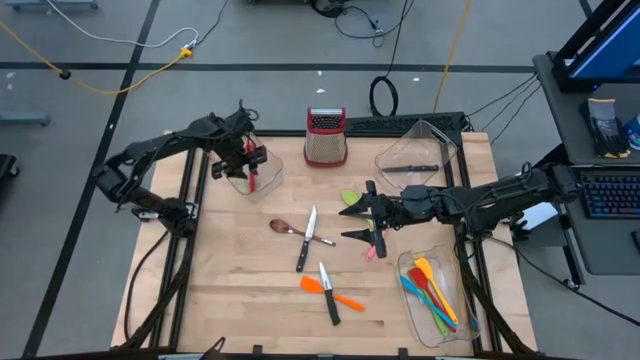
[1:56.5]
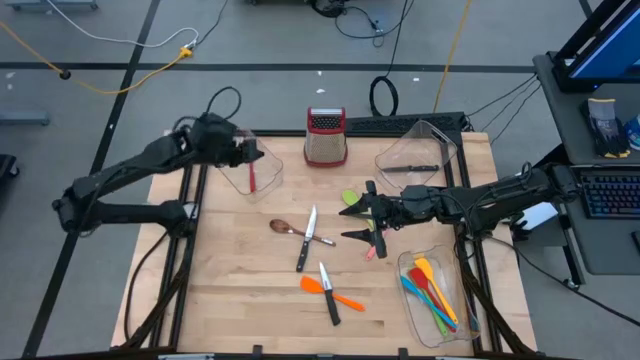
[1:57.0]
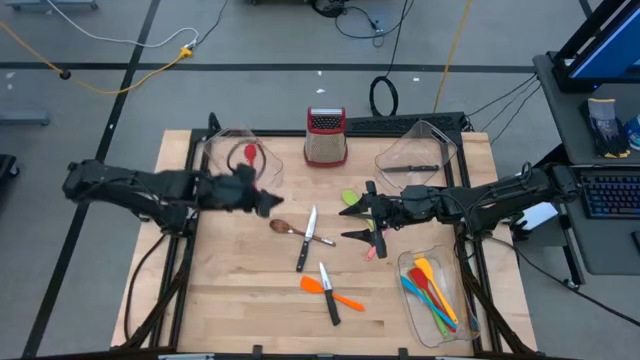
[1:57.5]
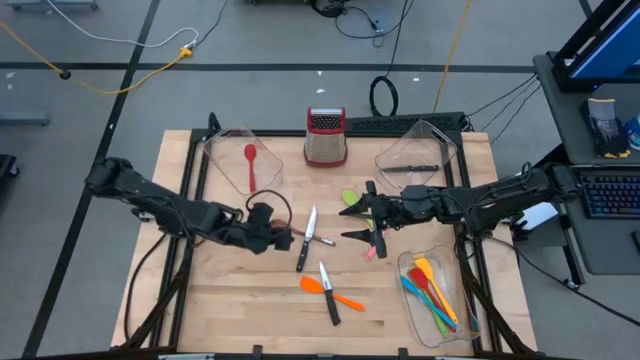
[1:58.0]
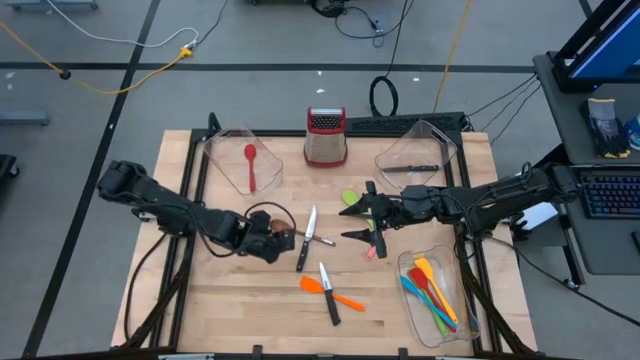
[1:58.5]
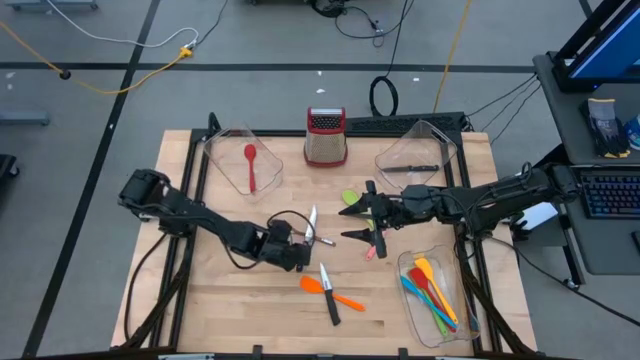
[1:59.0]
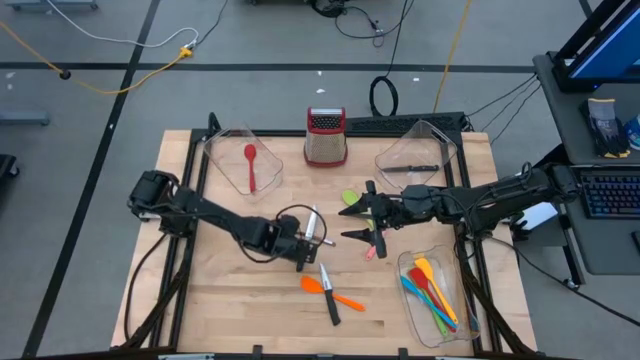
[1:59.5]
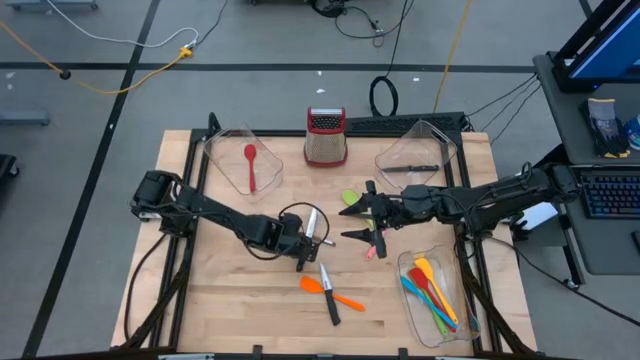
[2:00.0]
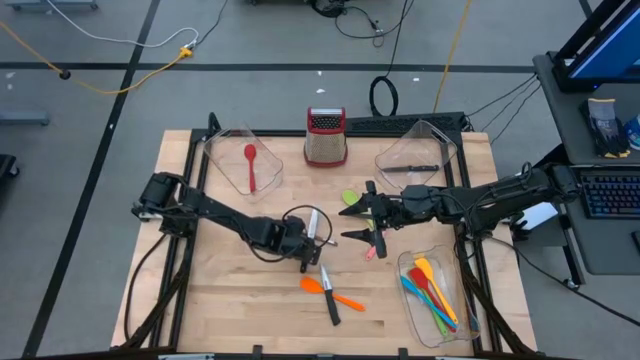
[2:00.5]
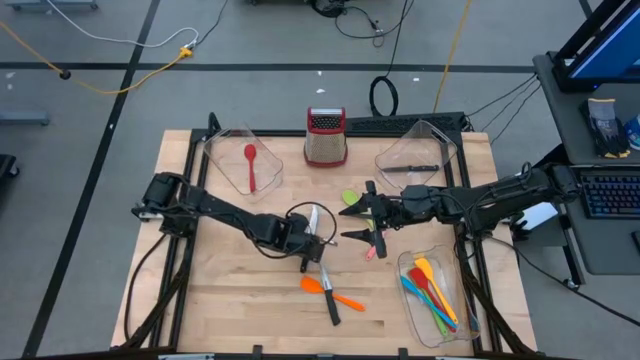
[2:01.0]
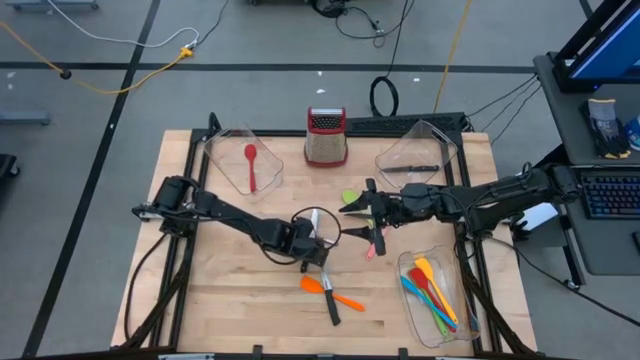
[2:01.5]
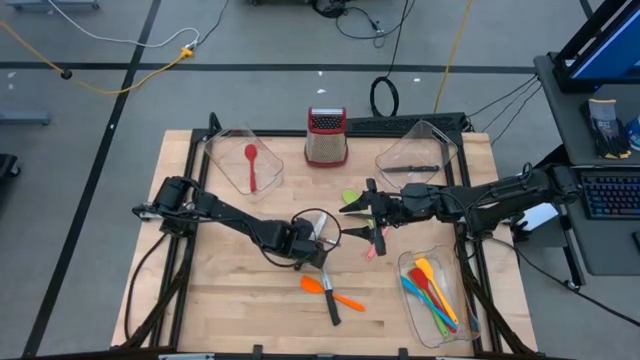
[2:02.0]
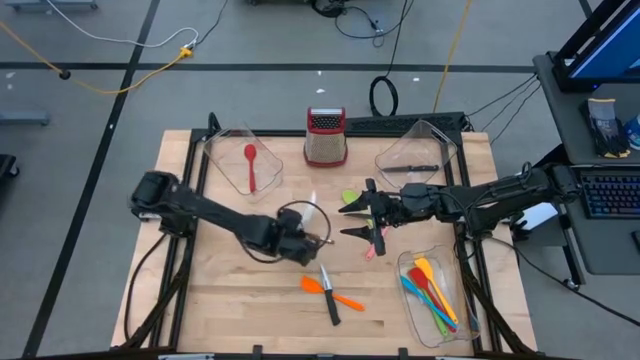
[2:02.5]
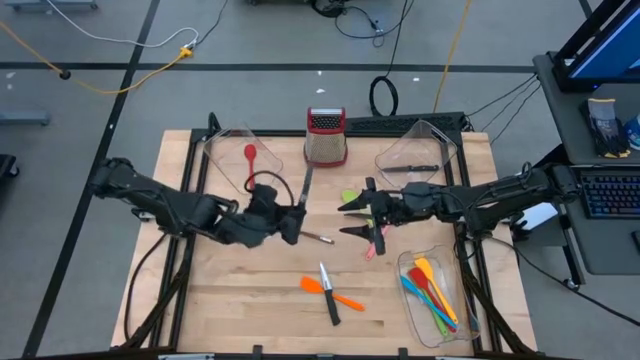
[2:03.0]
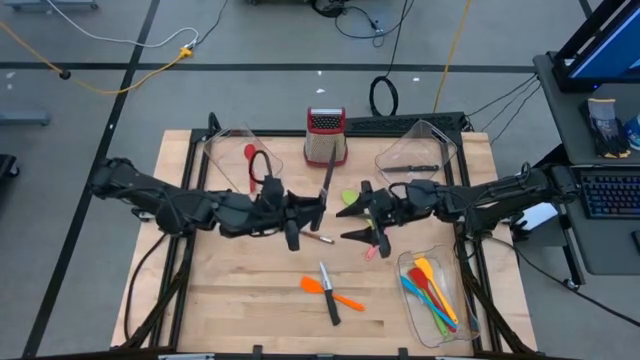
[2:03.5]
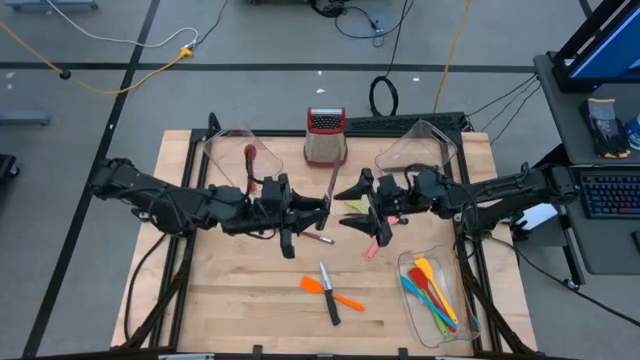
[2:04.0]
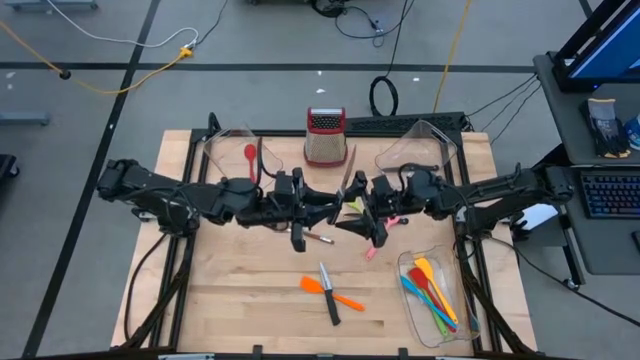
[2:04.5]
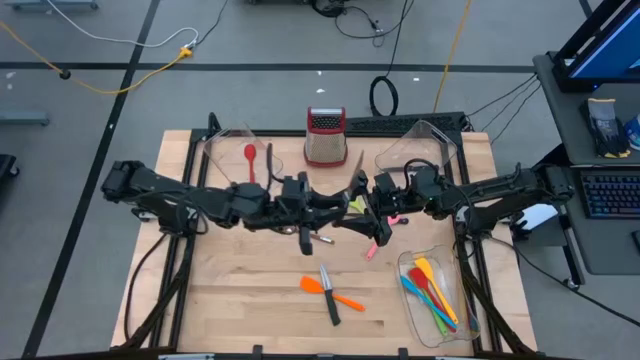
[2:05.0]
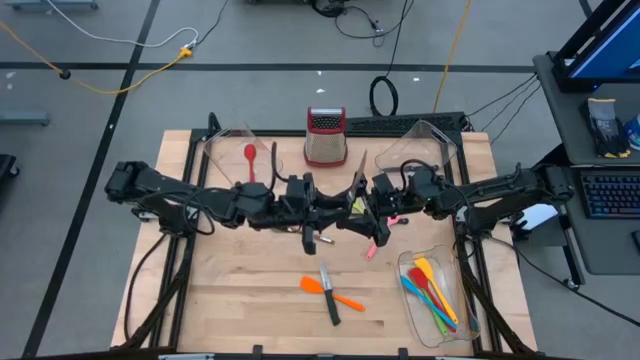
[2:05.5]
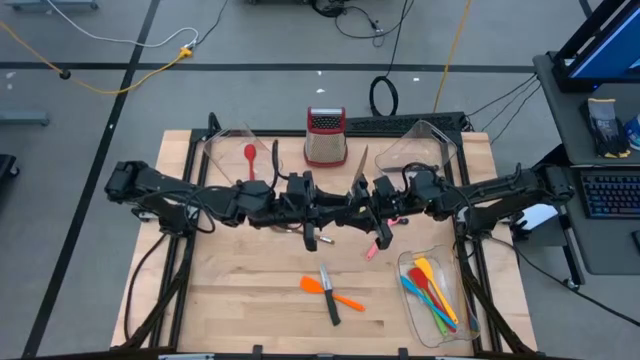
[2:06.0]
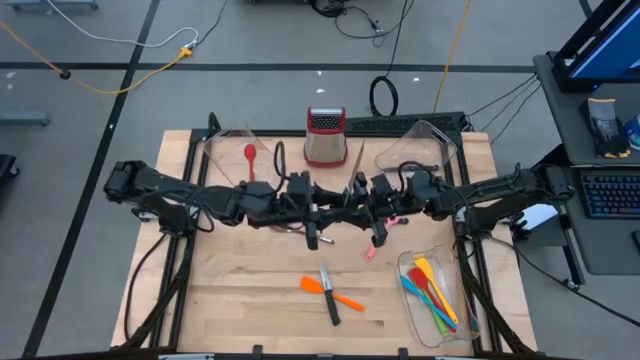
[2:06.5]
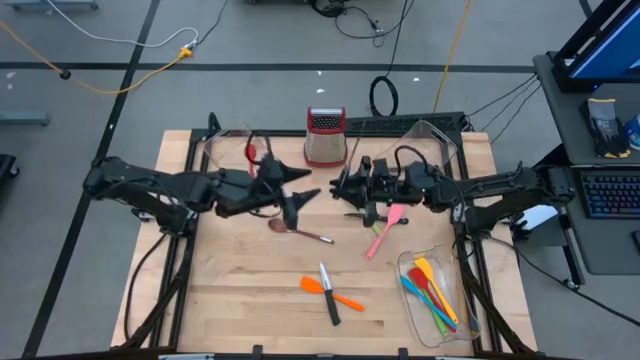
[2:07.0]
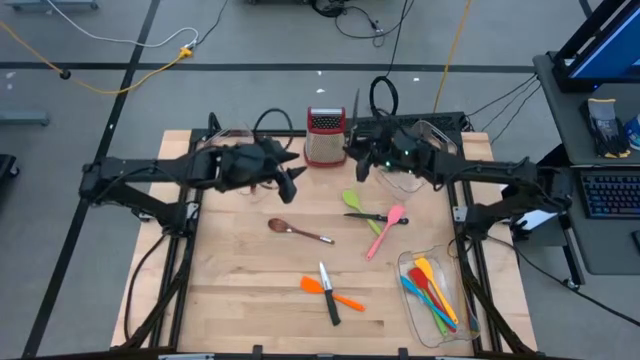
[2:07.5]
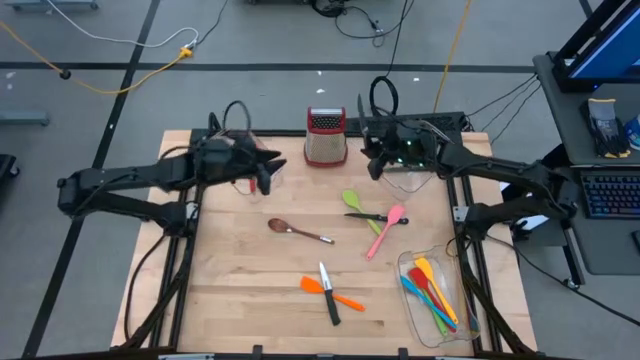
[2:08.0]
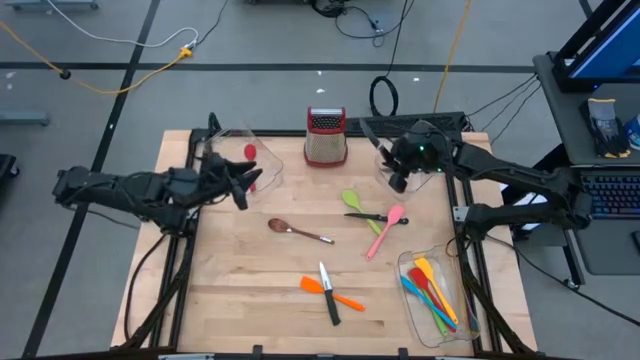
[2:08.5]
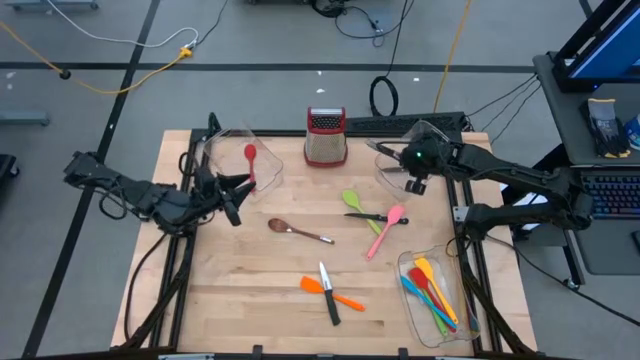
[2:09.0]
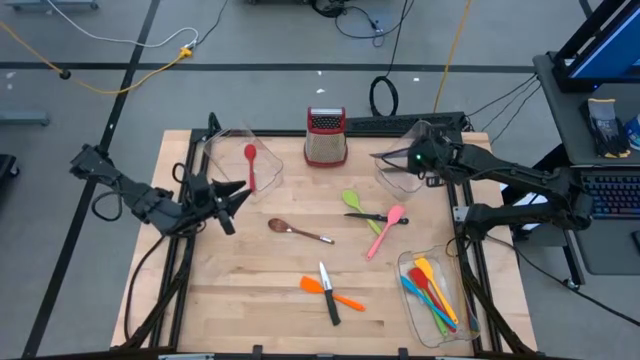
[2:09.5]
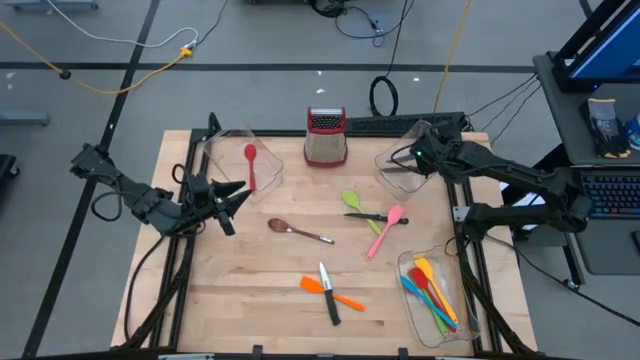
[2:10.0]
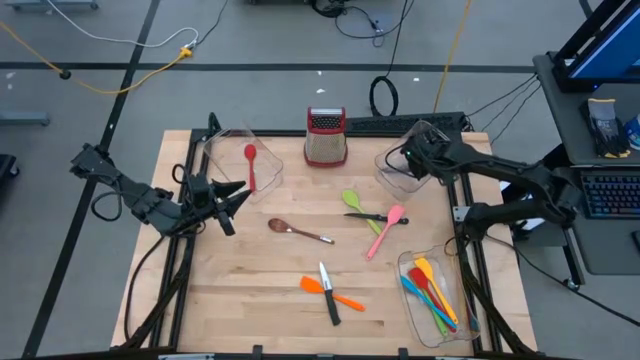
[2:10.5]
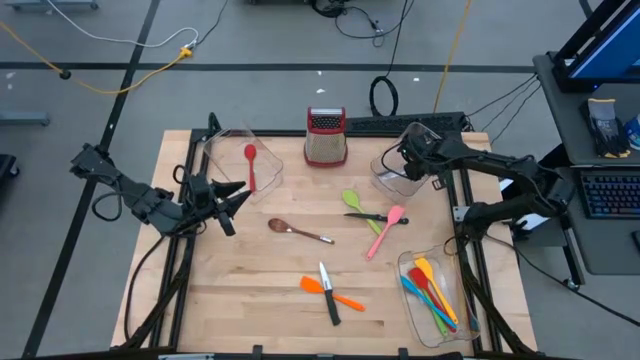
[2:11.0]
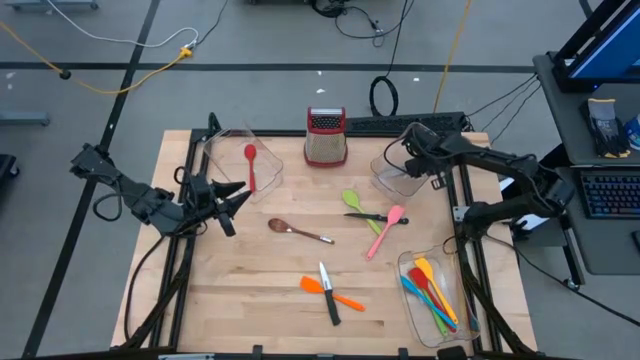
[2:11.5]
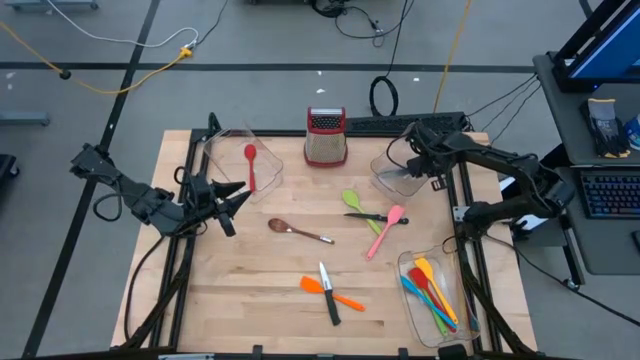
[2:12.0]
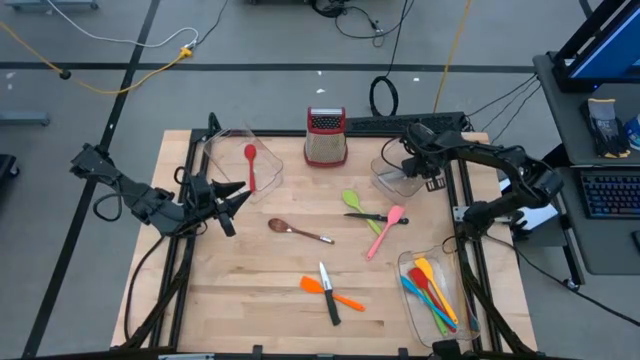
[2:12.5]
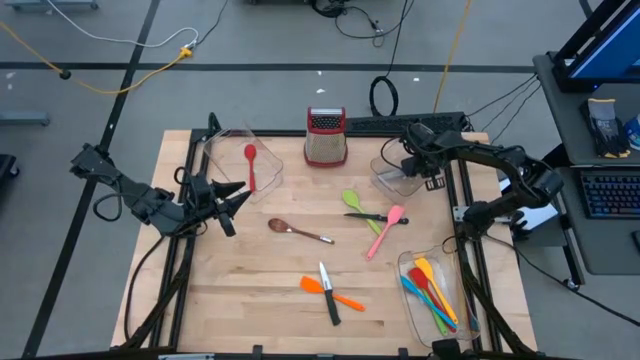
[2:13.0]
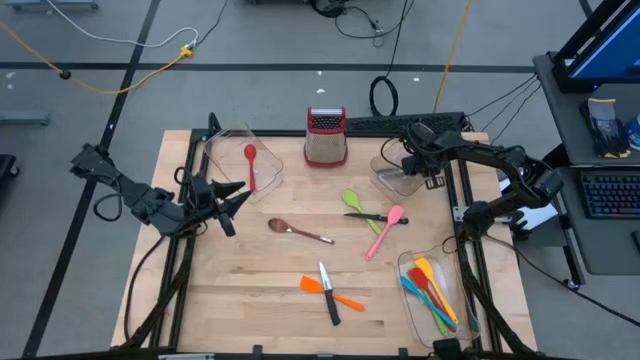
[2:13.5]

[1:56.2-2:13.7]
Task: Pick & Place Kitchen Items
Put the top silver kitchen knife into the top right transparent bin

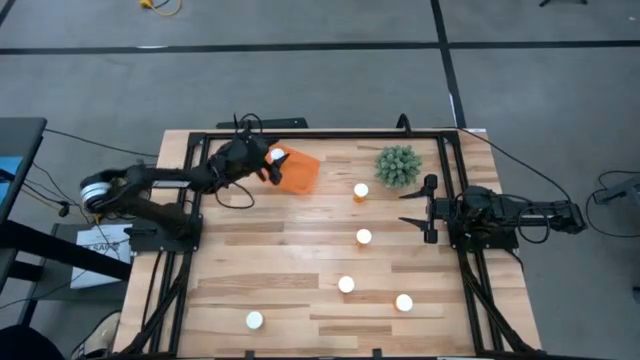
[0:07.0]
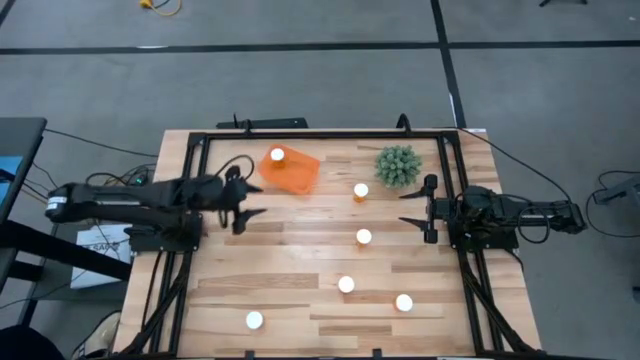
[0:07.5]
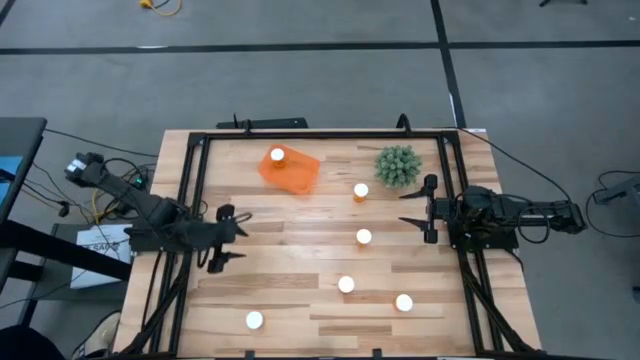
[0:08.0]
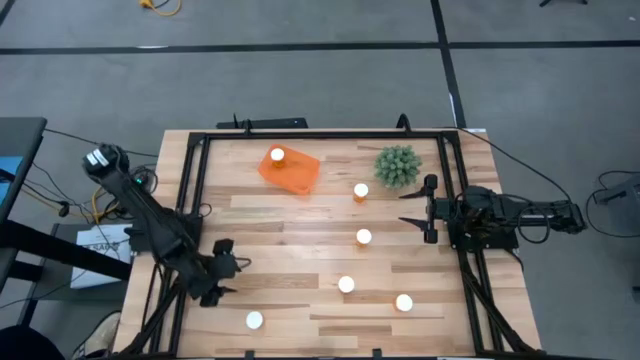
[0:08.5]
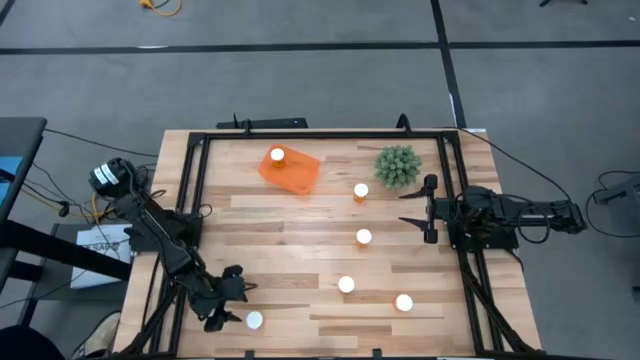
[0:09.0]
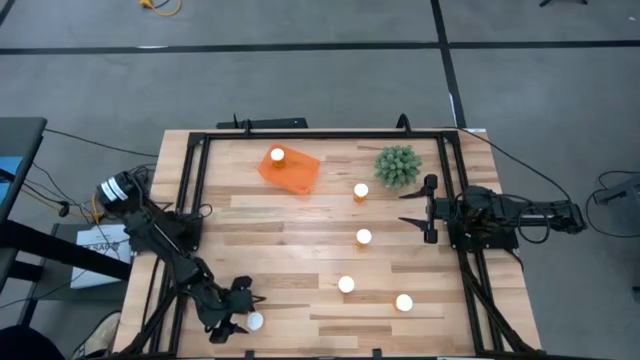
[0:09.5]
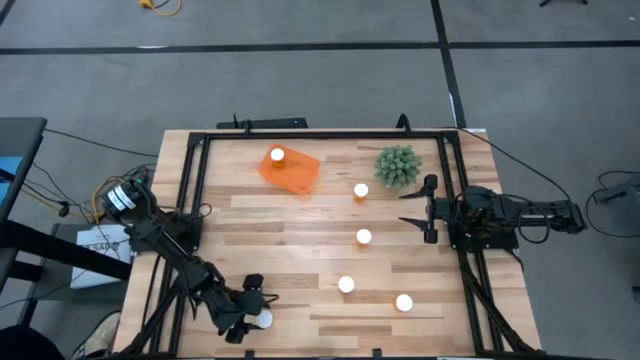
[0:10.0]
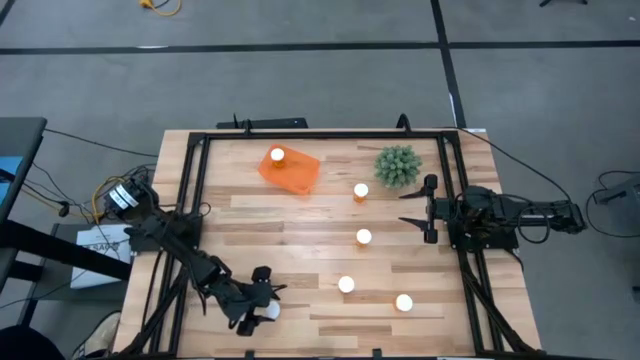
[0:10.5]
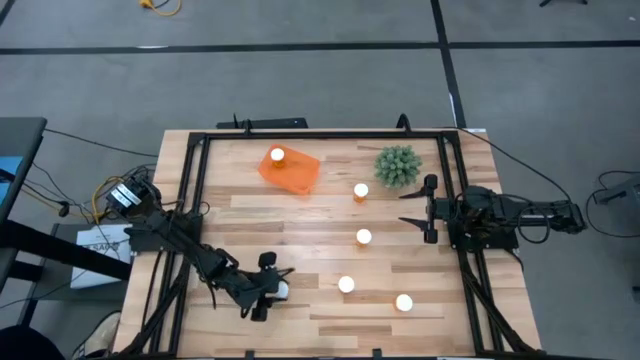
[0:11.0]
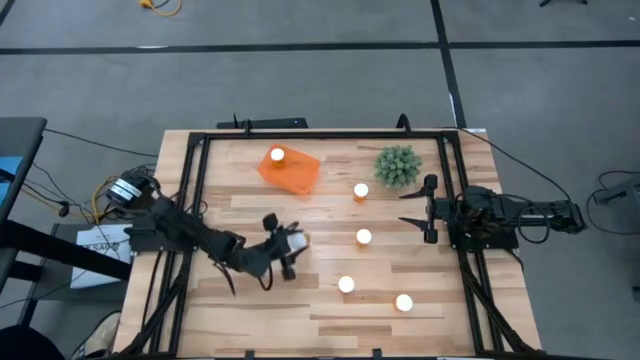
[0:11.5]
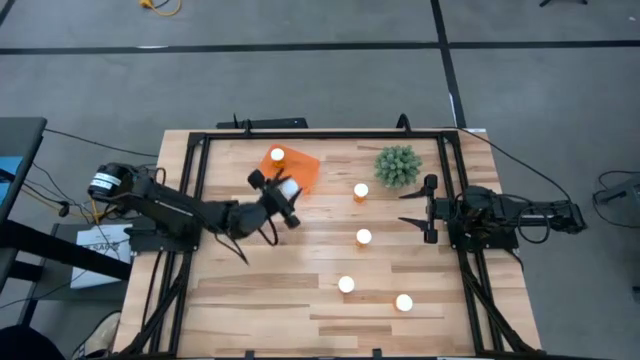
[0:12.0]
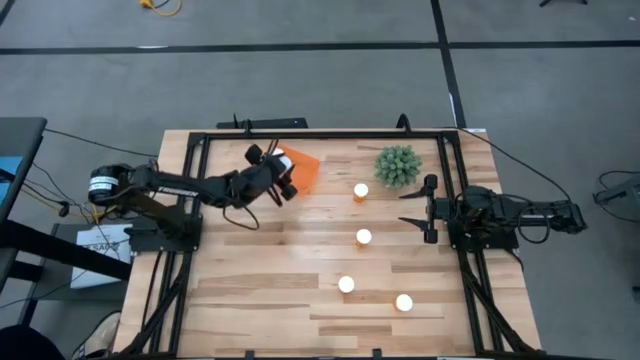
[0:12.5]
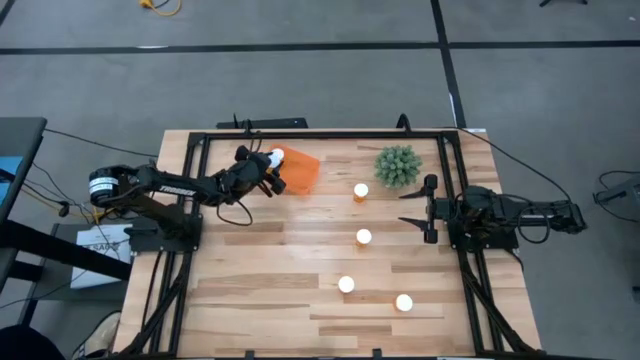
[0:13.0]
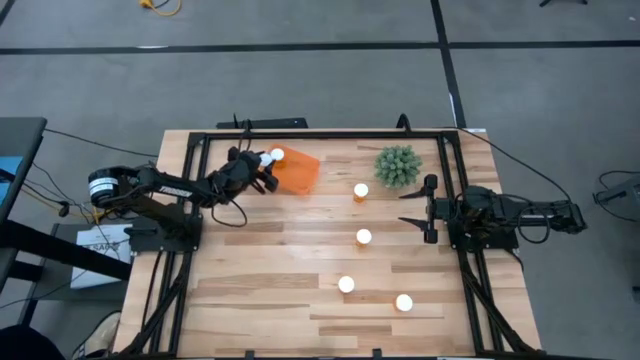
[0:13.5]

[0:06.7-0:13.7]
Task: Pick and place pill bottles into a basket
Put the orange pill bottle into the orange bin
